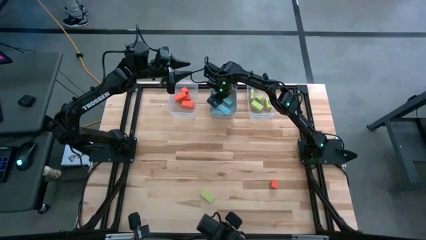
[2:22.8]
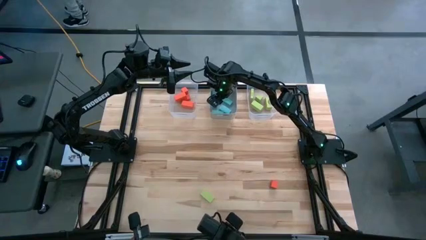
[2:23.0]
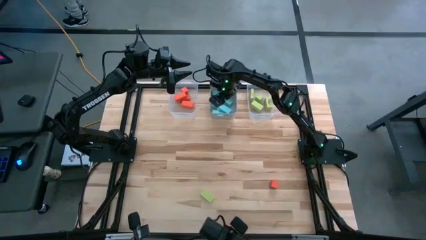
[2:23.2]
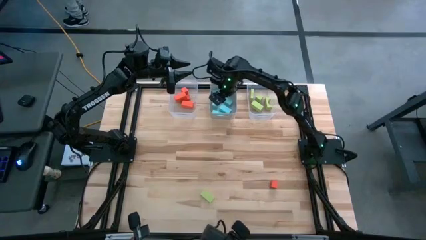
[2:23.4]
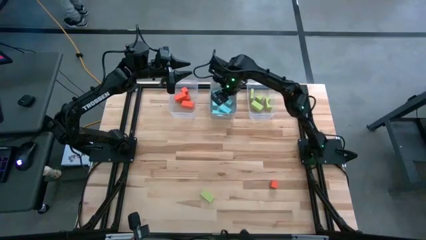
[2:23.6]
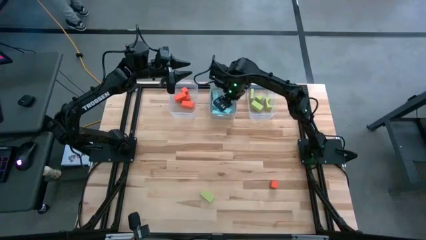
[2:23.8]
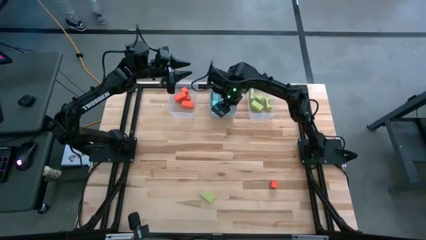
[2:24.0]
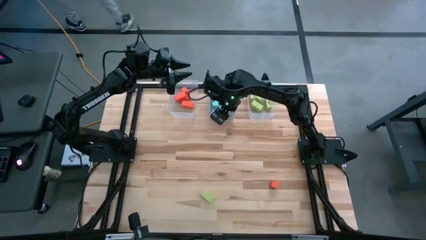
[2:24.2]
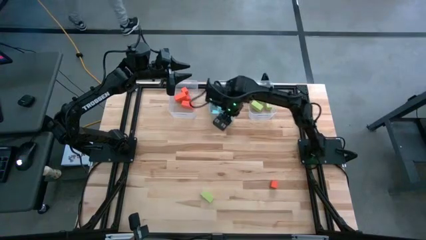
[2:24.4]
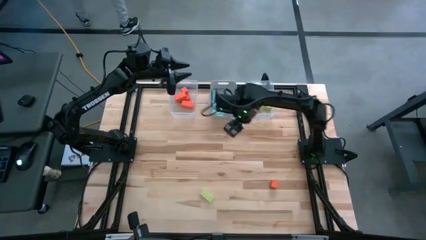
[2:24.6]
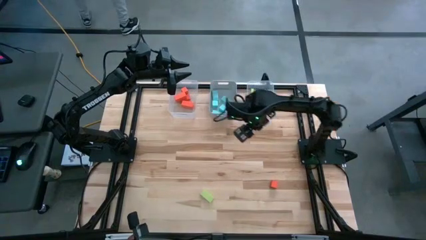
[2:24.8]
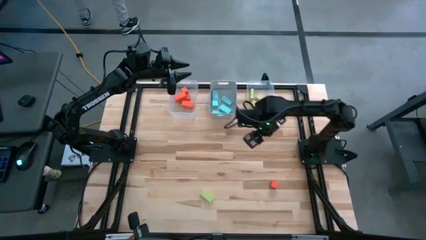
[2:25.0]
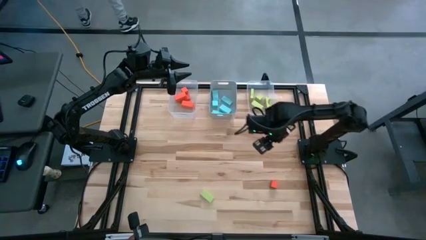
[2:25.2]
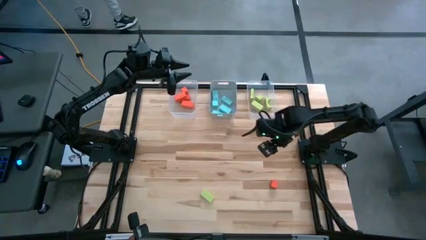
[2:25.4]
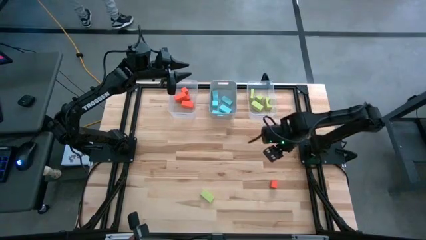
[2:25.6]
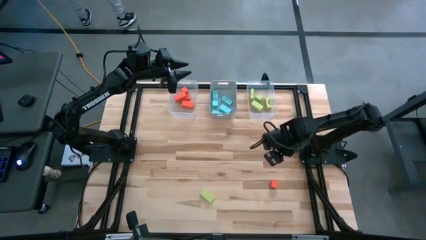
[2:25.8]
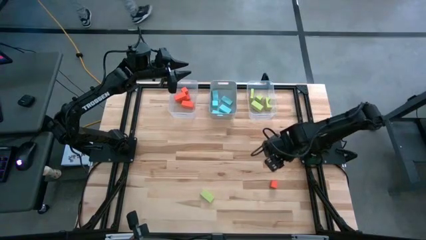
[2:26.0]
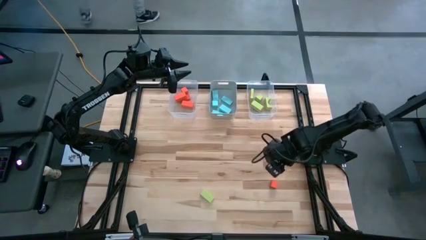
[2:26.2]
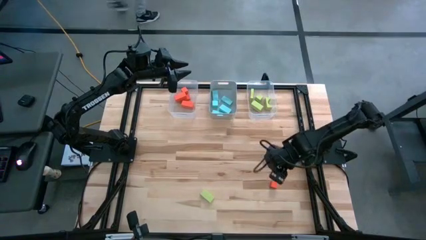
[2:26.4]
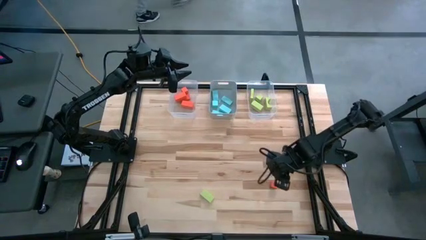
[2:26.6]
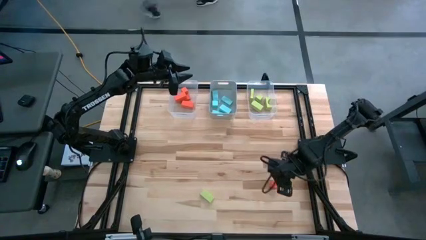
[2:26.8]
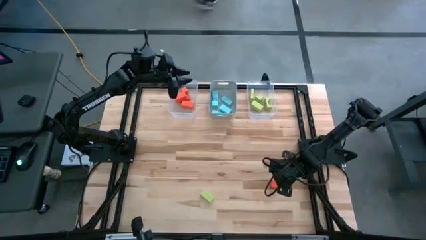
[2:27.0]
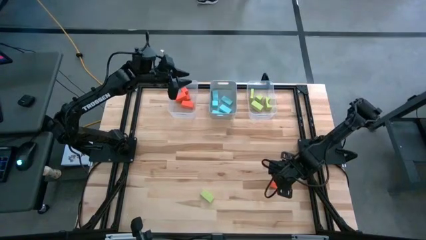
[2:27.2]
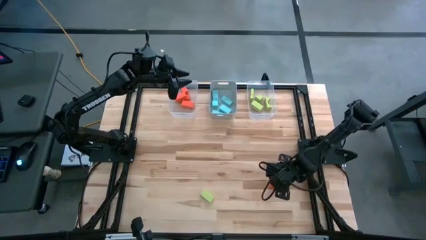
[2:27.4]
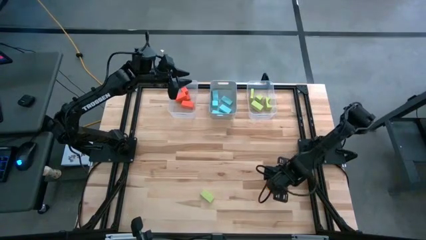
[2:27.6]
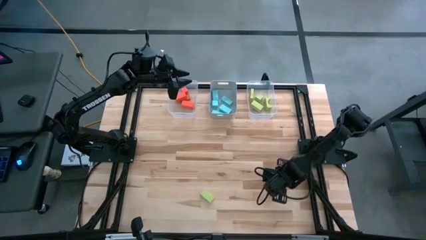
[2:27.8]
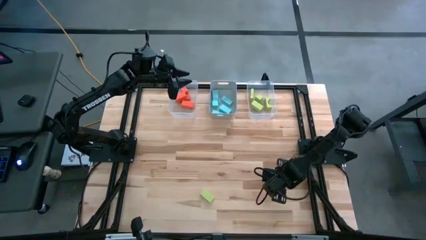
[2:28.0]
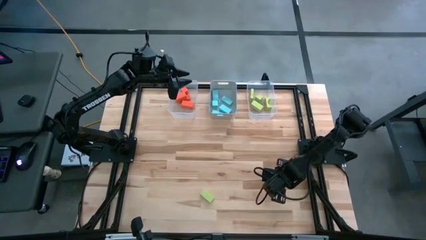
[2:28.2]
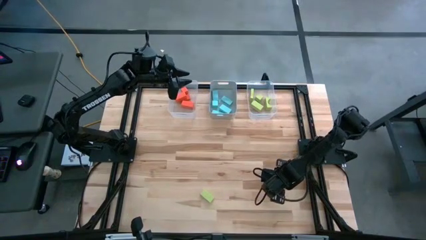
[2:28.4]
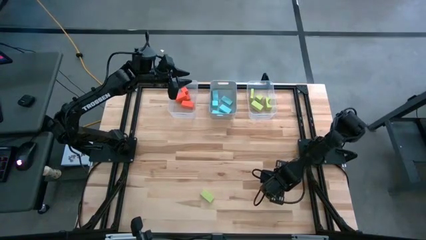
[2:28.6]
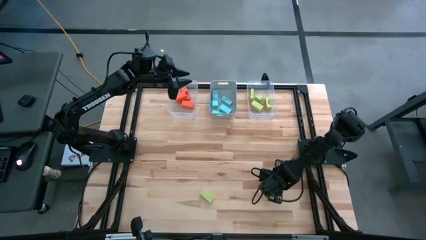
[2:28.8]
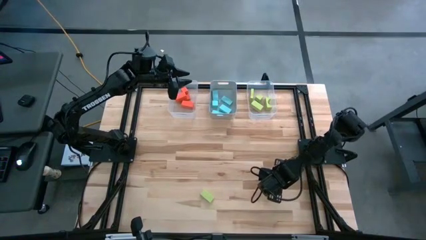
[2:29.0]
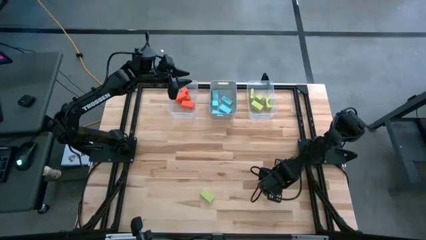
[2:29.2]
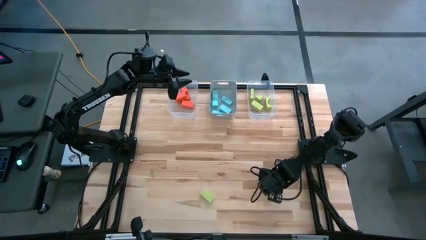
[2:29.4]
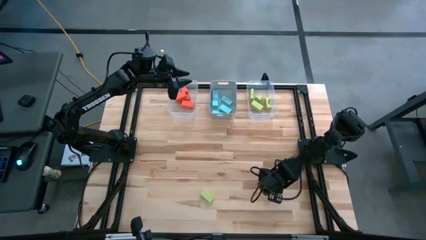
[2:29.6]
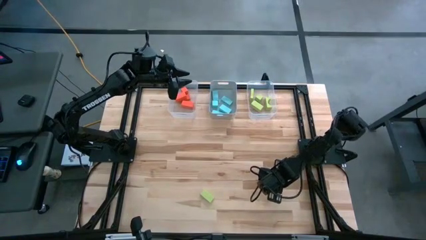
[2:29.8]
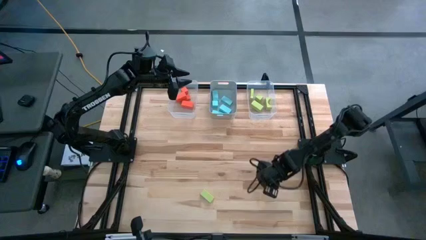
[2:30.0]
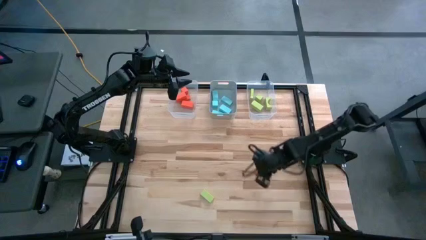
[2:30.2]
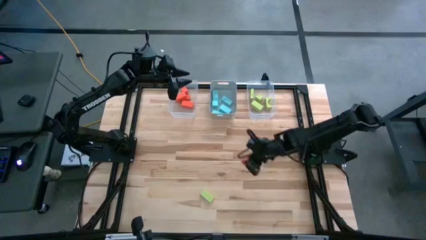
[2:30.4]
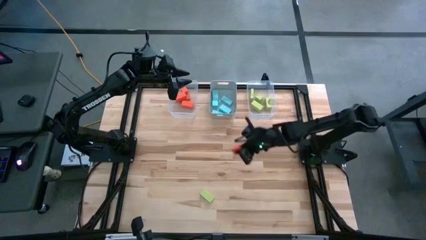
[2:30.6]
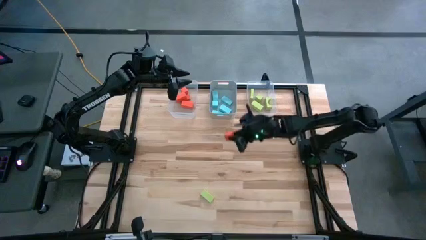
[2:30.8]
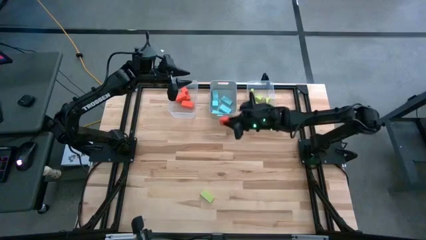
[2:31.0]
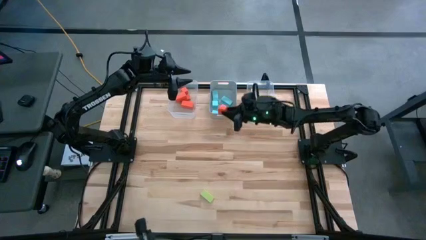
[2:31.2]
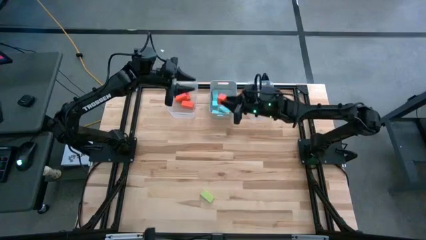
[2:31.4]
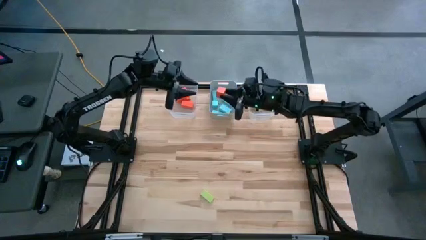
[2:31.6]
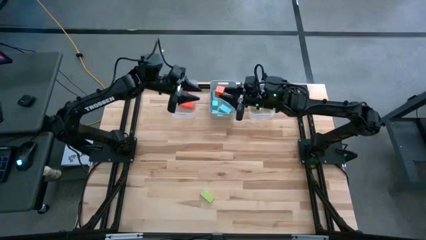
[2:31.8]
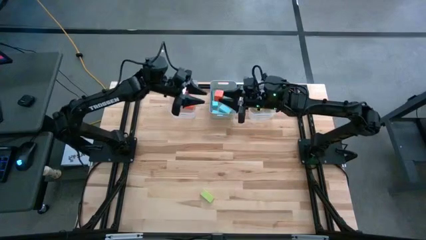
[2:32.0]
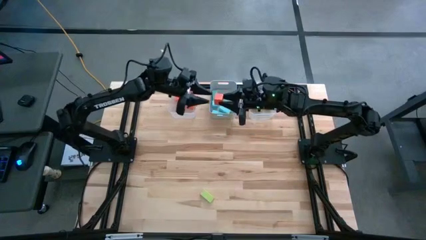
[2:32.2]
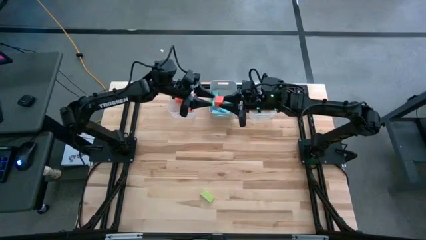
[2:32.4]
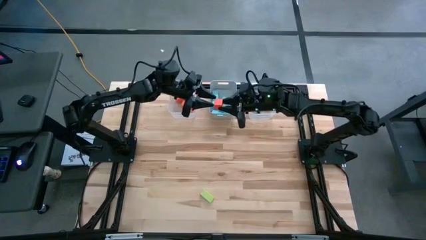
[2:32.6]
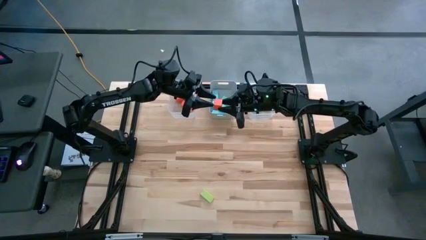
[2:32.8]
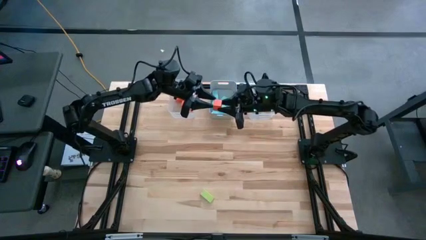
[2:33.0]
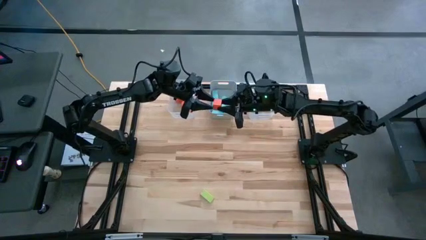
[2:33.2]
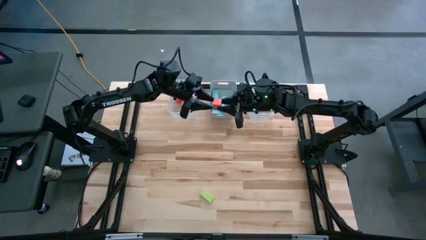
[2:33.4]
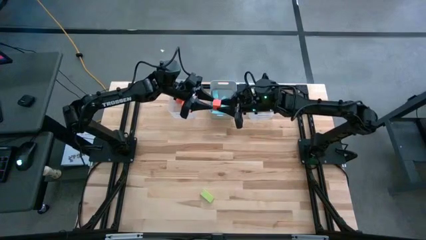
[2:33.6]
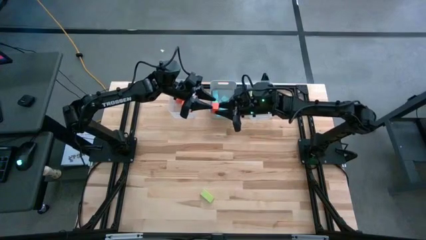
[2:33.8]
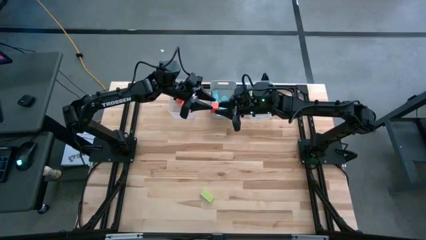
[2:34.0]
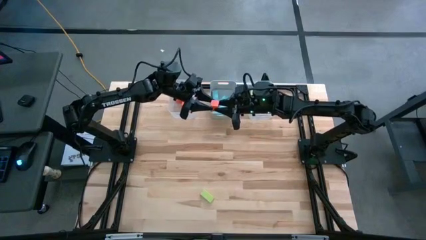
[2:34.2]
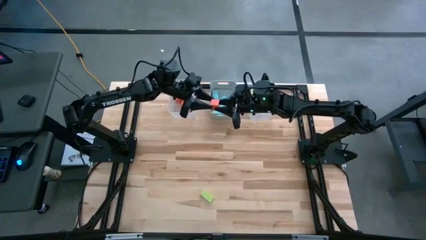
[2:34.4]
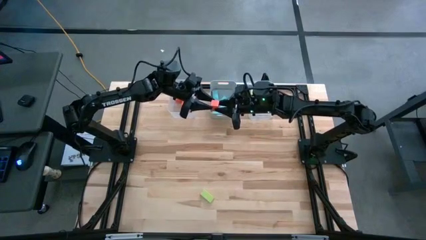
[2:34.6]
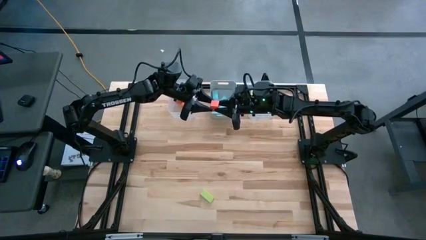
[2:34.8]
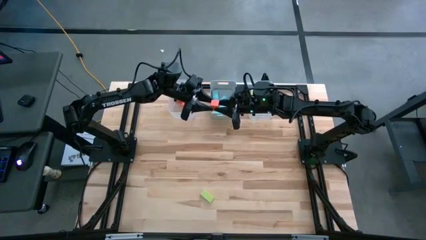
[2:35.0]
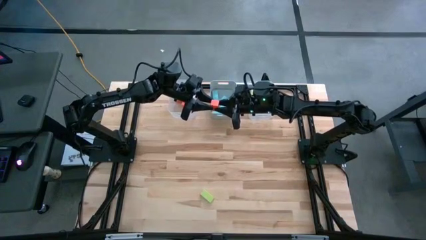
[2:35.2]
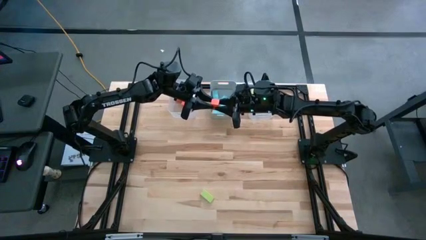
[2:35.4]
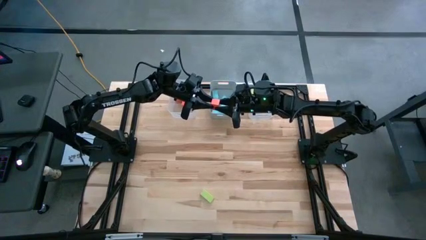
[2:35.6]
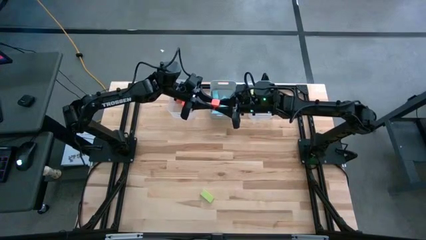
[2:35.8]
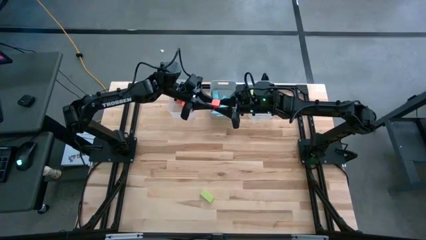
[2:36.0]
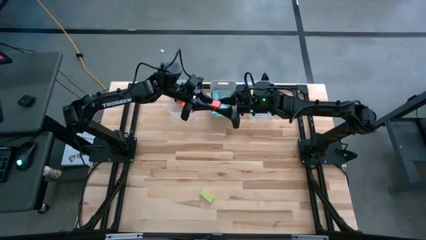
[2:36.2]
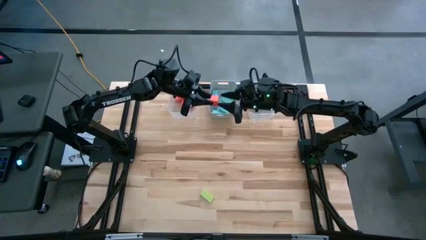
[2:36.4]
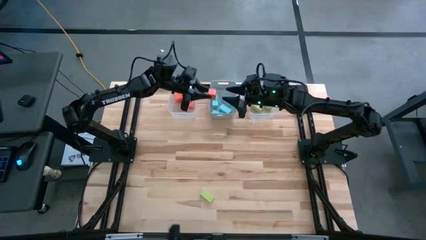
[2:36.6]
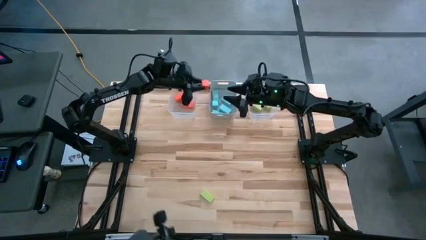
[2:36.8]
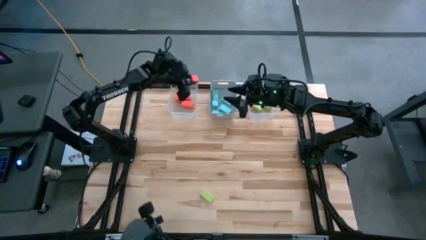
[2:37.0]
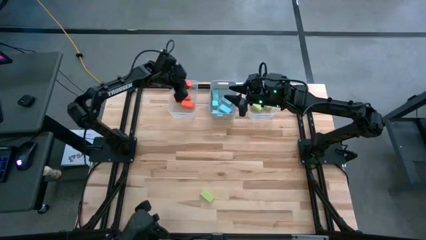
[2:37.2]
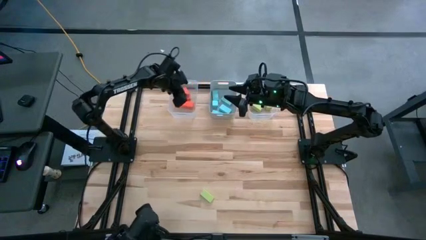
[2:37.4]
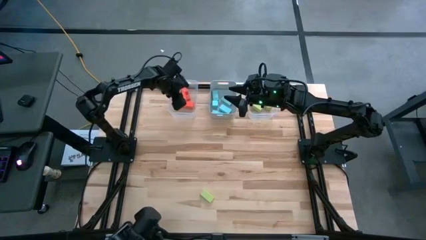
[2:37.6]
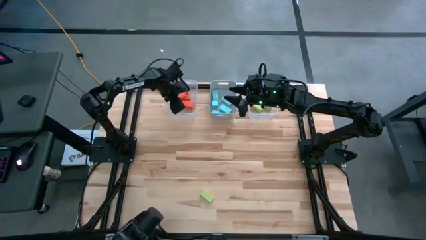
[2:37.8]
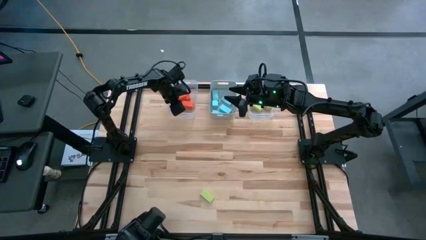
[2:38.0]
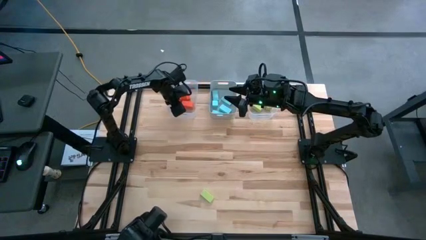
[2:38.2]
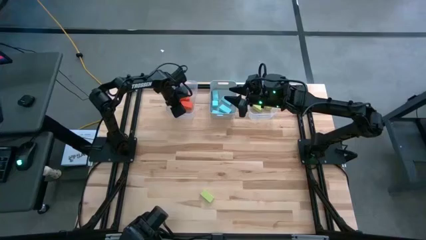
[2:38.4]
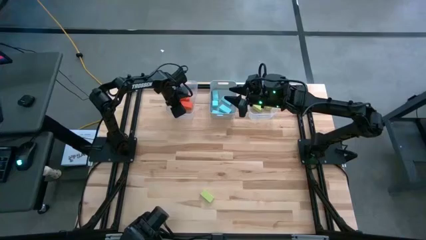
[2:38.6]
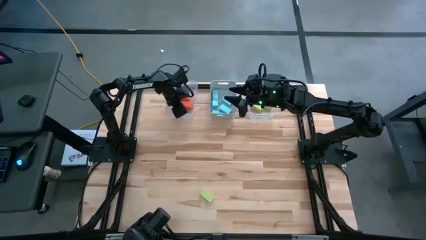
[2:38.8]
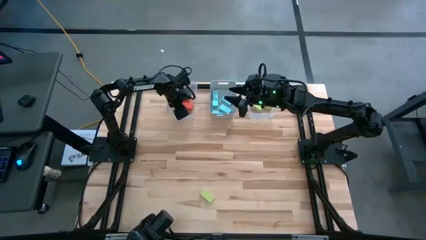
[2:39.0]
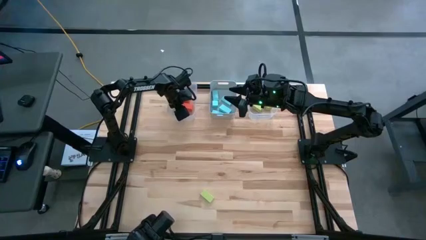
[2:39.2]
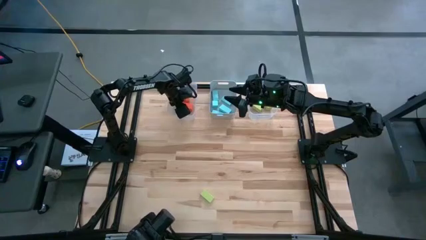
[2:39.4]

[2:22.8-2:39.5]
Task: Sort & place blocks by color
Put the orange block into the left transparent bin
